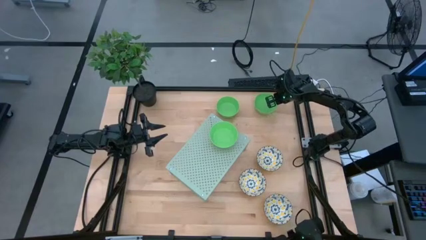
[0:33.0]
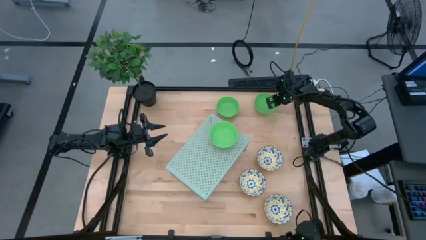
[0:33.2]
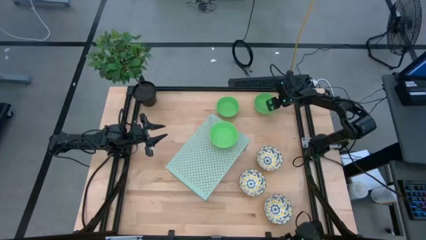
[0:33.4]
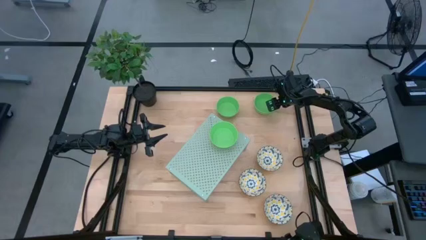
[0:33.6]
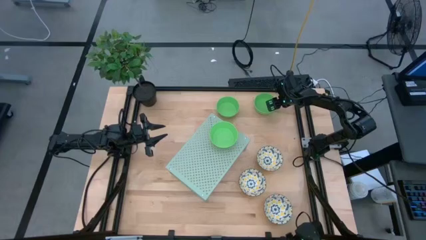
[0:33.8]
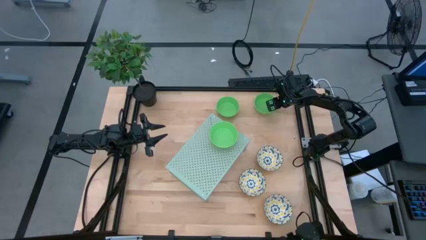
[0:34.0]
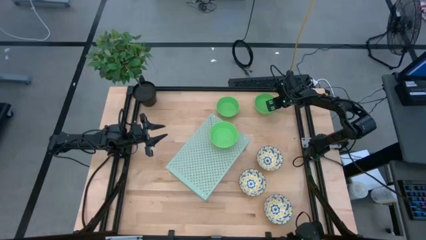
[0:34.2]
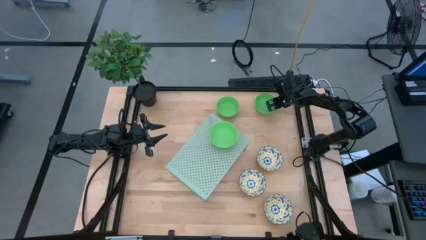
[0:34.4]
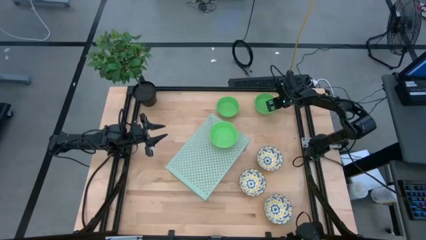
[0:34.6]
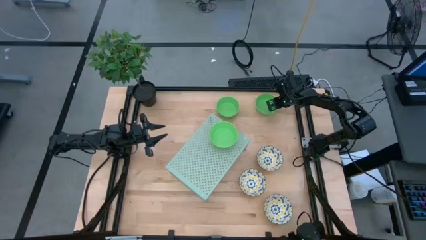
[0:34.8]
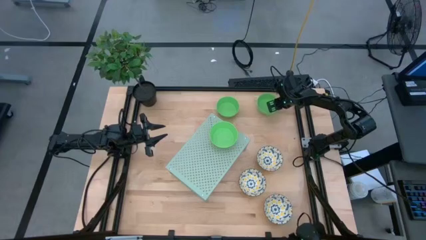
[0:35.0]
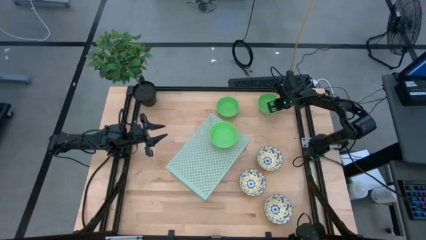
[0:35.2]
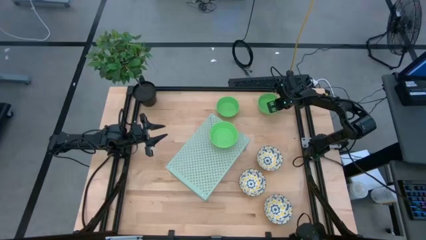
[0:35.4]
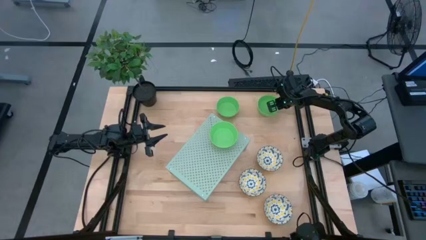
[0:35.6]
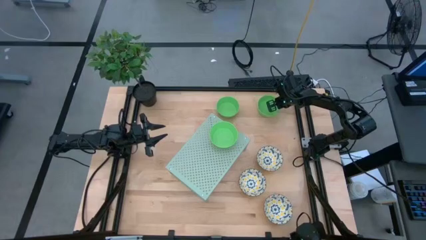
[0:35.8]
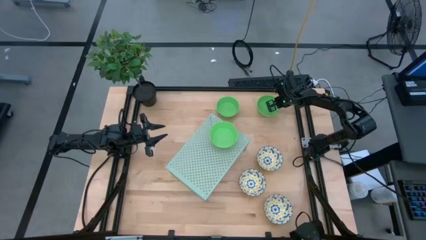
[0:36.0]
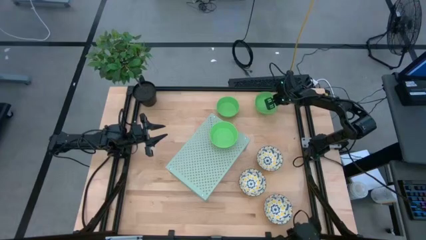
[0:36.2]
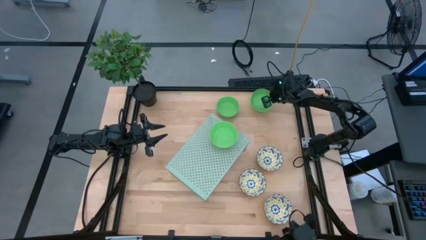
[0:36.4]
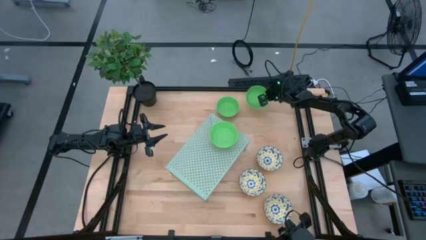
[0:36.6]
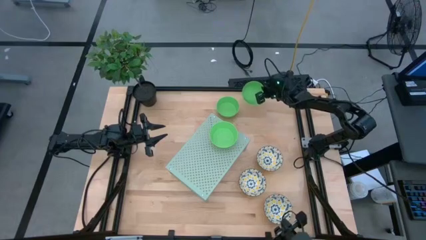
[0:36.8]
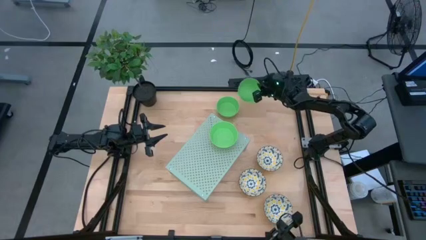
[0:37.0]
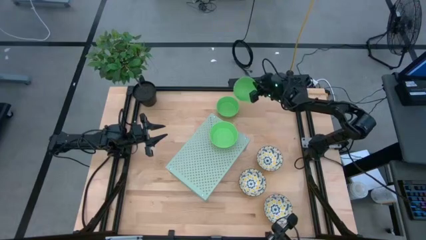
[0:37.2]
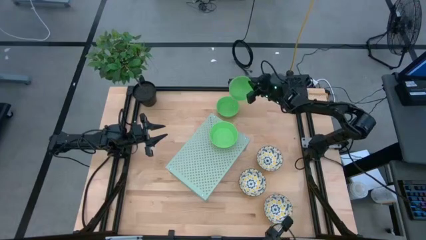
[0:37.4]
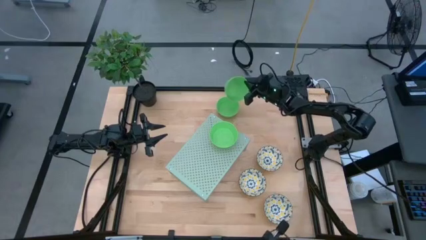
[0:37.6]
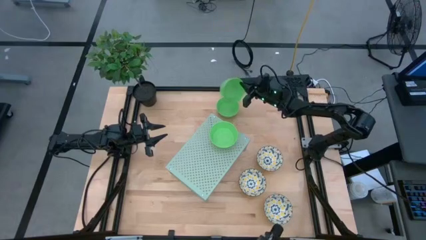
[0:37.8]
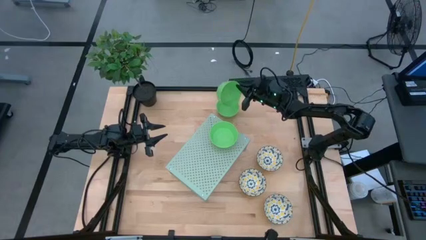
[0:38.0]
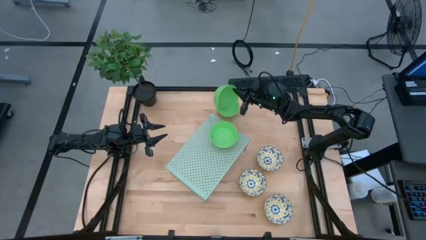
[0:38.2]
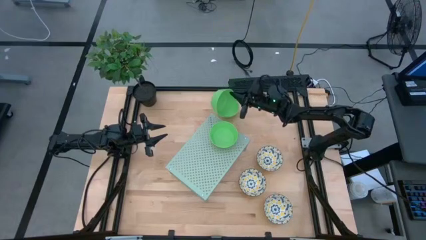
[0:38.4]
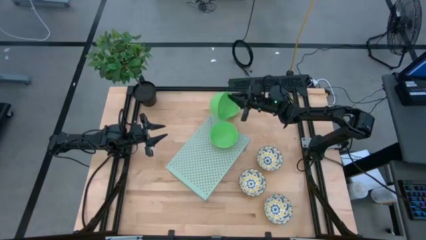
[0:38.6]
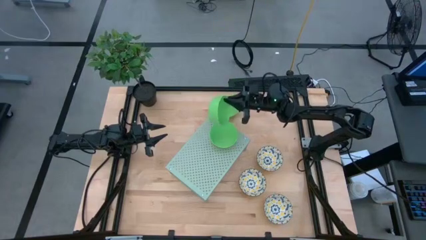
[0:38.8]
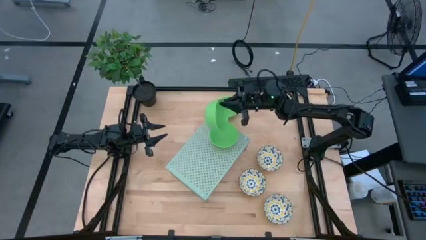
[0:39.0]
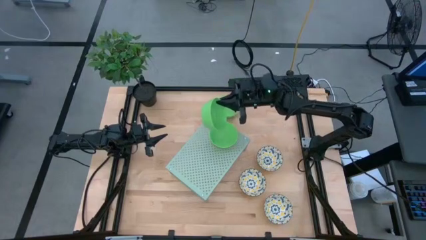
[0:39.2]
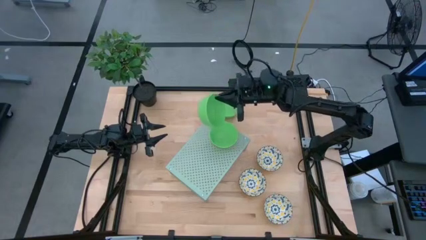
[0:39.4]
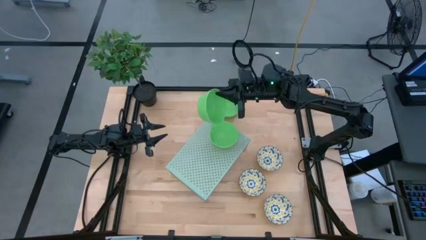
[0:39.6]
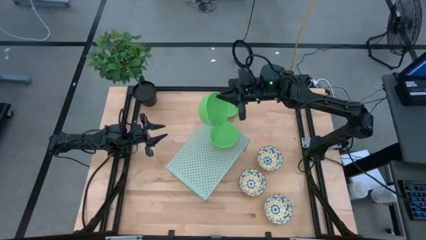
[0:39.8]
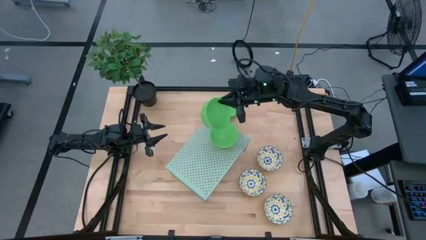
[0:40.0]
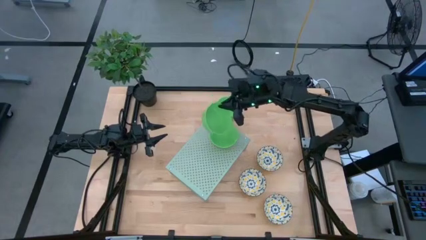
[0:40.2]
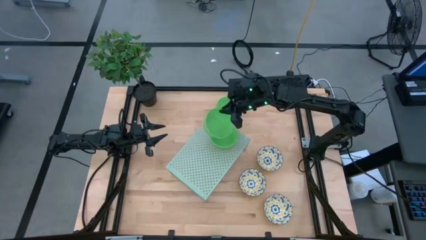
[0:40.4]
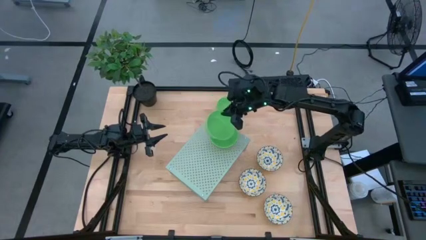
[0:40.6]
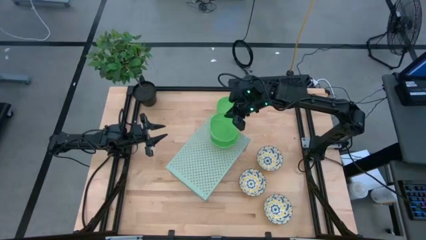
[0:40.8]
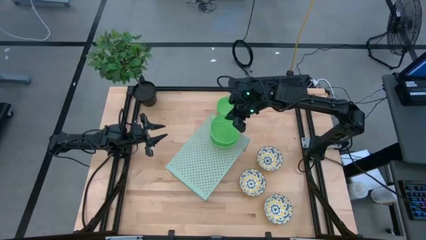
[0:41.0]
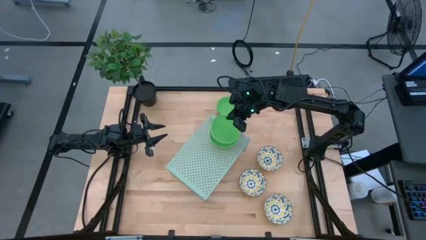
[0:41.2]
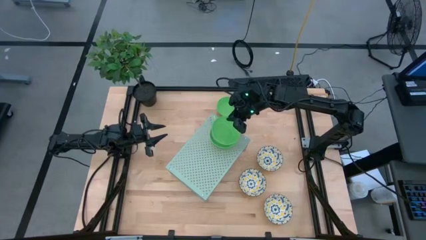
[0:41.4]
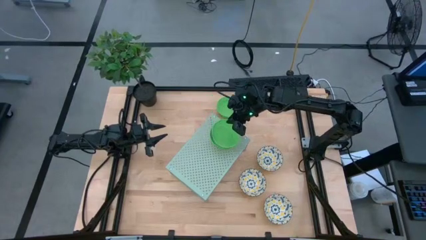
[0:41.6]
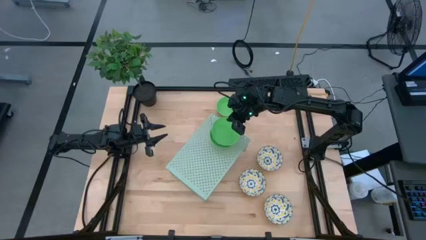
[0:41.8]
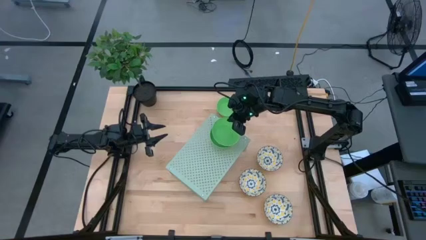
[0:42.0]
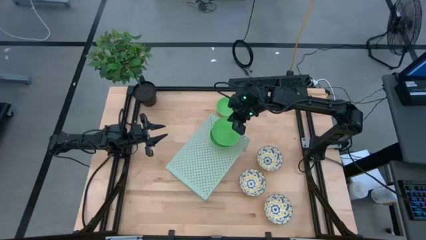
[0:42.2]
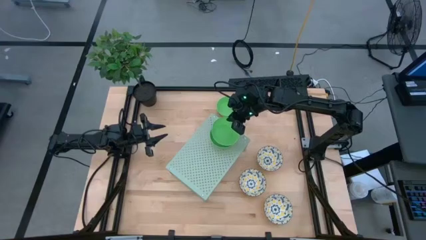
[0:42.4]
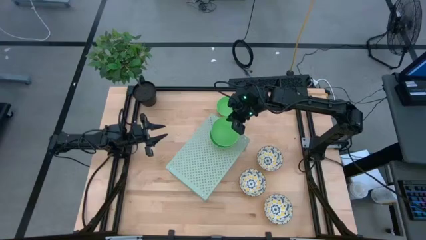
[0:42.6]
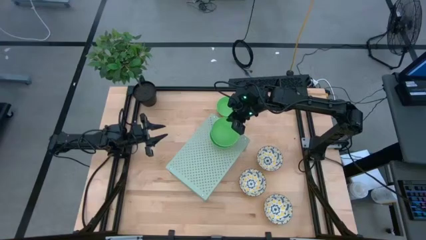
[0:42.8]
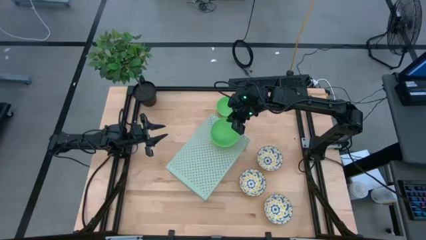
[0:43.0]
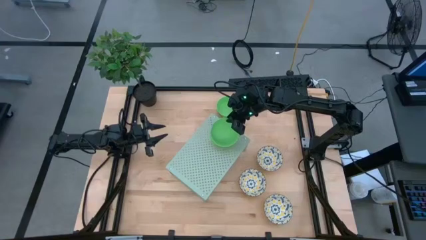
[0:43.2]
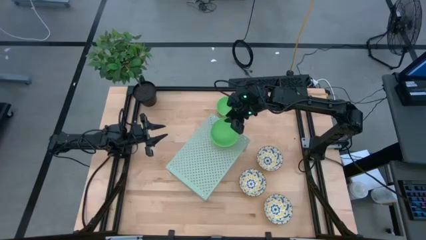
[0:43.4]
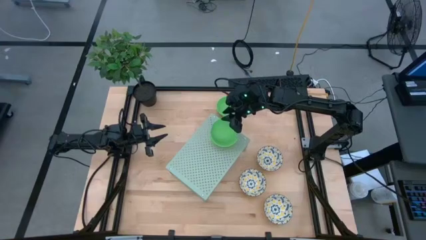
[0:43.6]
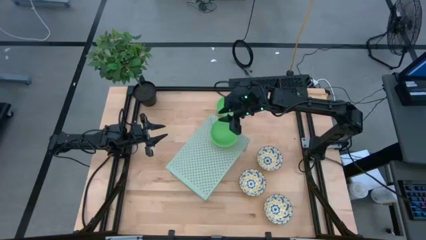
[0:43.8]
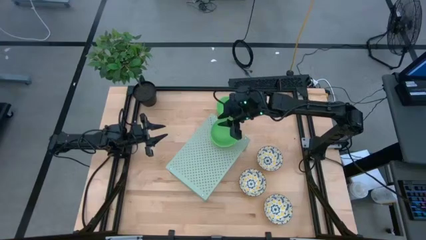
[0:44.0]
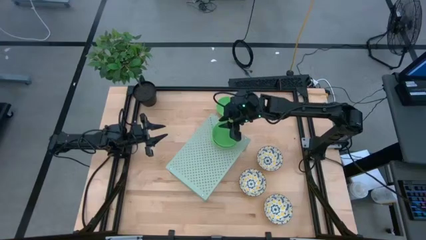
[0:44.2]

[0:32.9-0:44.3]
Task: Pick & Place Mini bowls
Stack the right green bowl on the green bowl on the shelf
